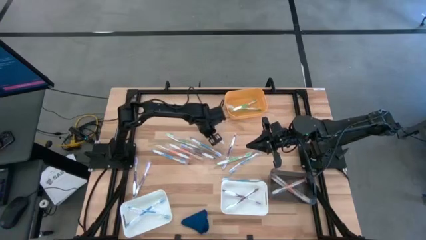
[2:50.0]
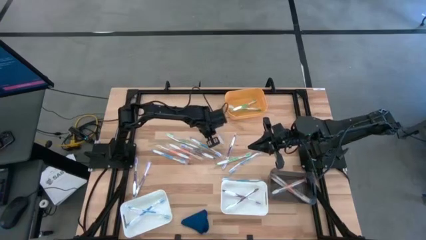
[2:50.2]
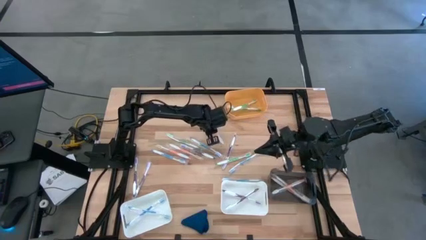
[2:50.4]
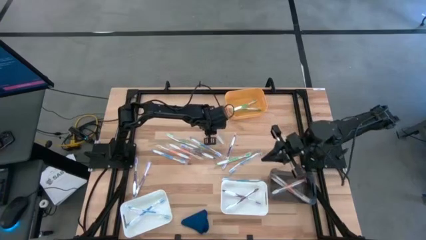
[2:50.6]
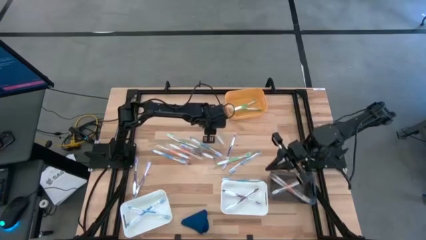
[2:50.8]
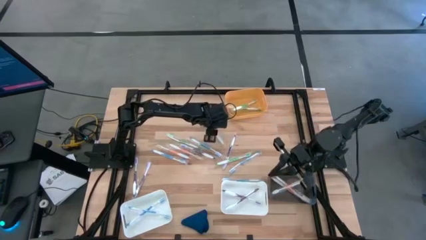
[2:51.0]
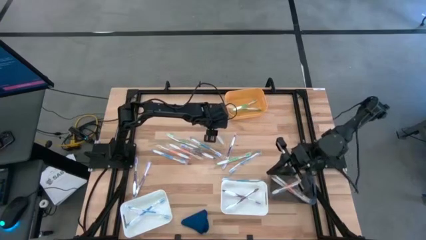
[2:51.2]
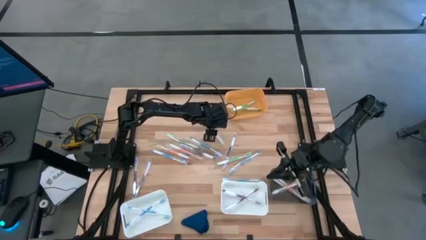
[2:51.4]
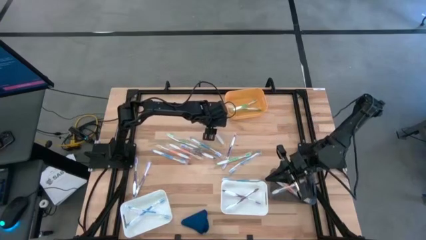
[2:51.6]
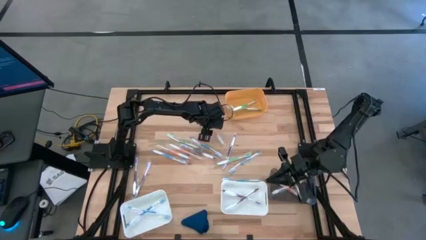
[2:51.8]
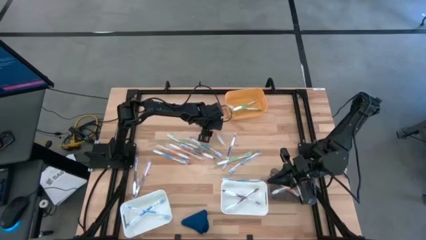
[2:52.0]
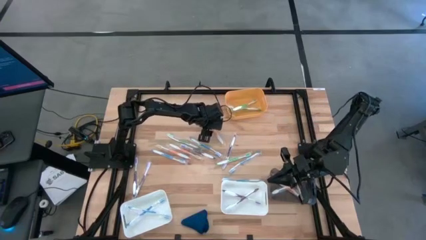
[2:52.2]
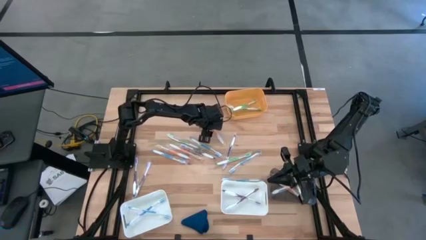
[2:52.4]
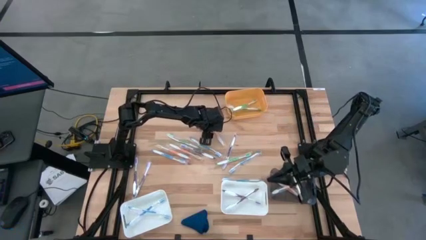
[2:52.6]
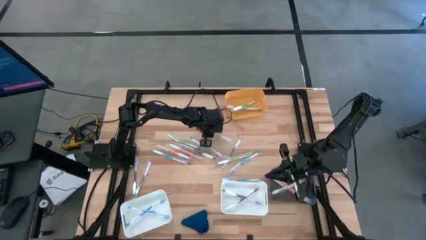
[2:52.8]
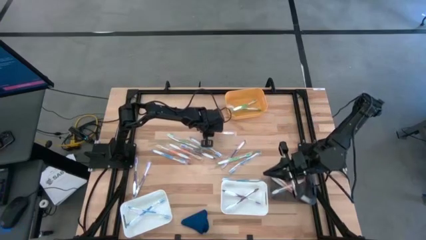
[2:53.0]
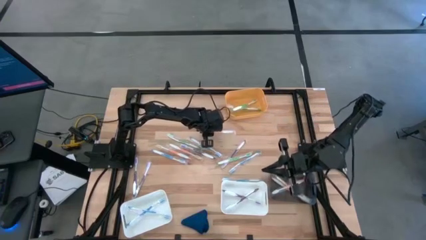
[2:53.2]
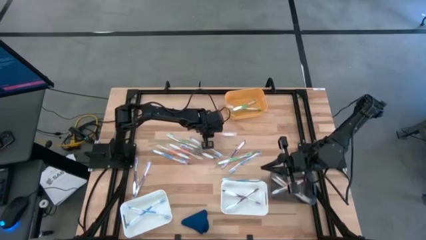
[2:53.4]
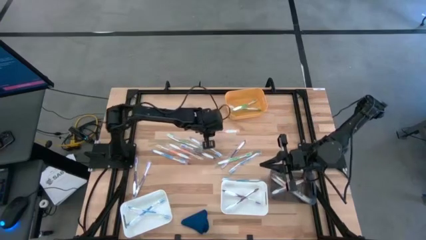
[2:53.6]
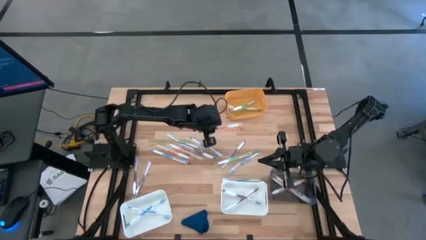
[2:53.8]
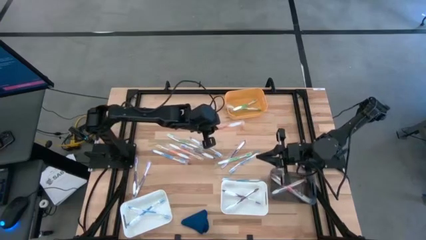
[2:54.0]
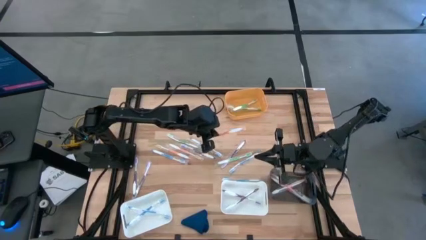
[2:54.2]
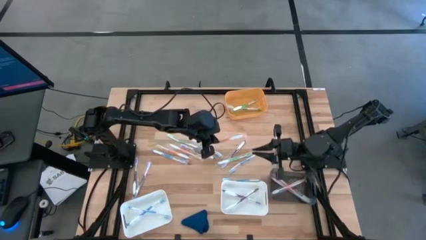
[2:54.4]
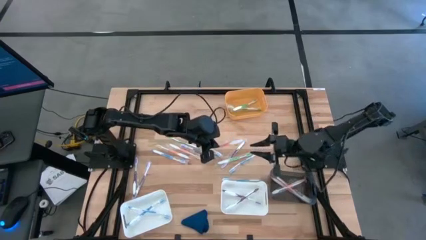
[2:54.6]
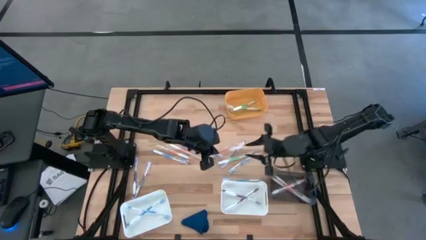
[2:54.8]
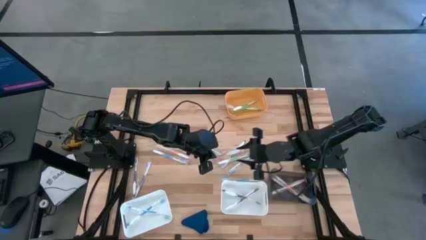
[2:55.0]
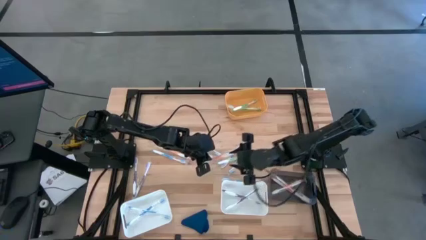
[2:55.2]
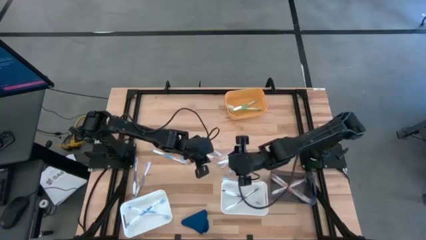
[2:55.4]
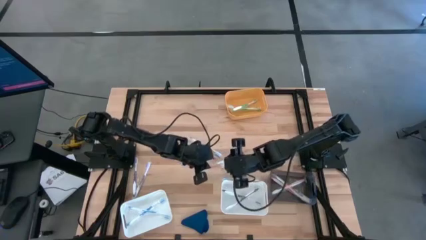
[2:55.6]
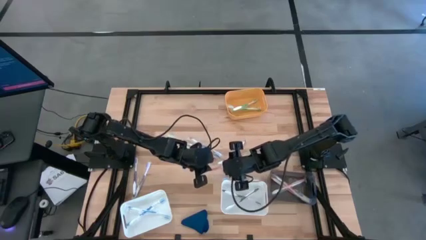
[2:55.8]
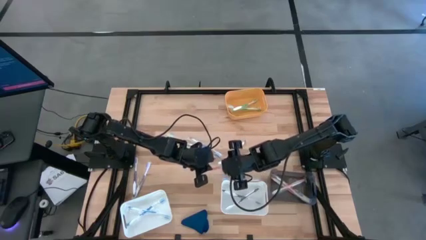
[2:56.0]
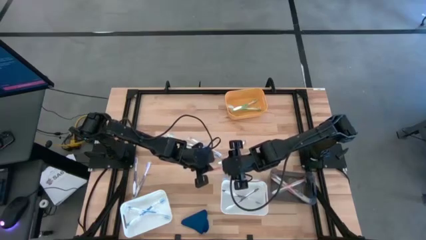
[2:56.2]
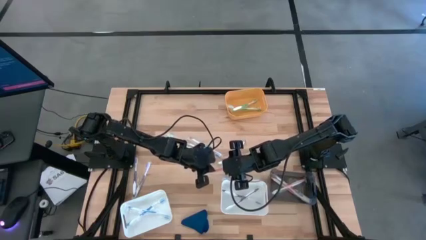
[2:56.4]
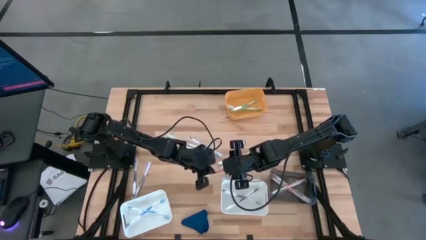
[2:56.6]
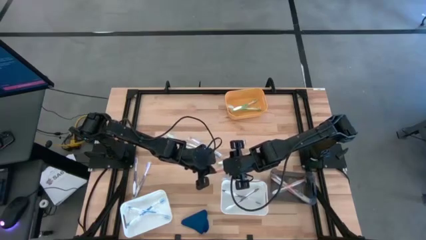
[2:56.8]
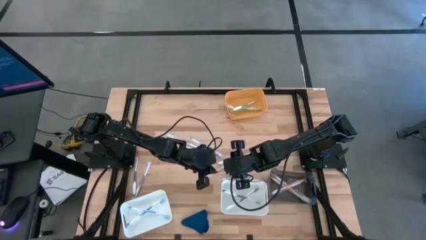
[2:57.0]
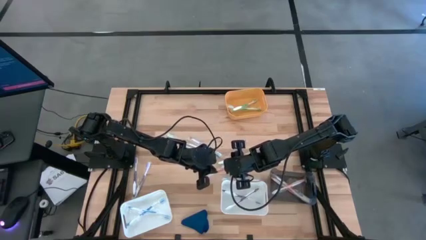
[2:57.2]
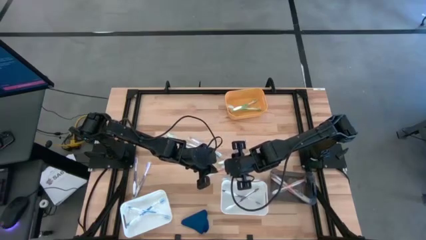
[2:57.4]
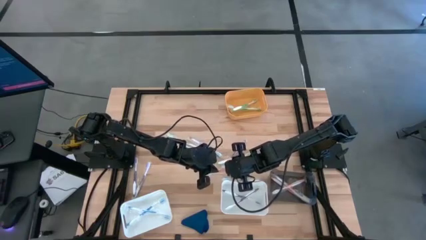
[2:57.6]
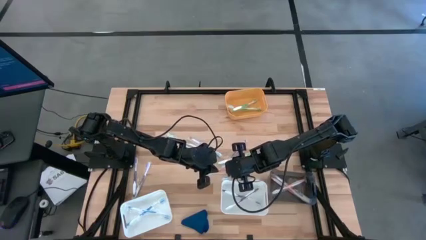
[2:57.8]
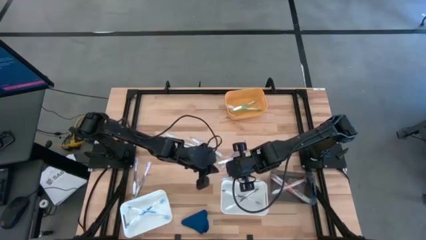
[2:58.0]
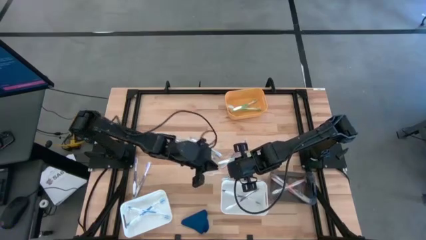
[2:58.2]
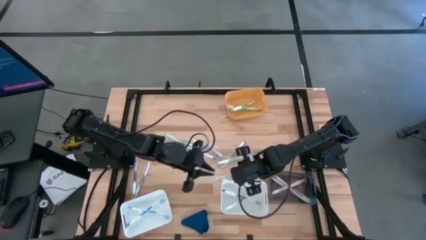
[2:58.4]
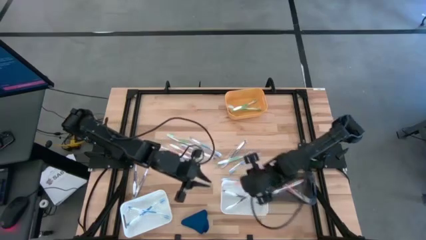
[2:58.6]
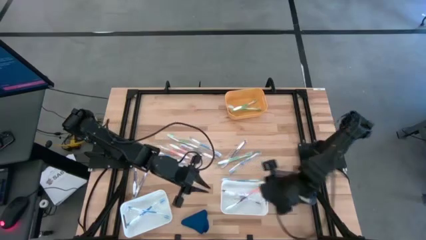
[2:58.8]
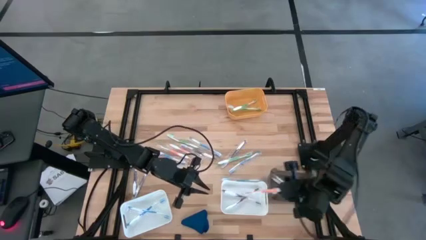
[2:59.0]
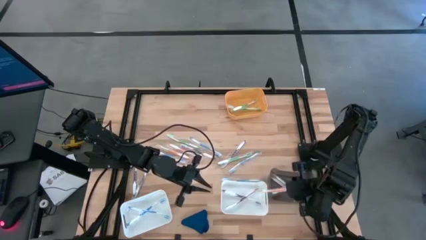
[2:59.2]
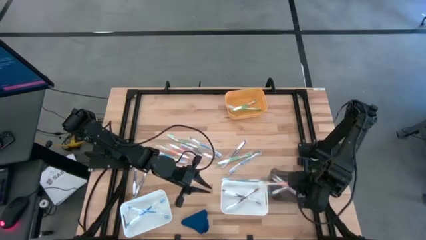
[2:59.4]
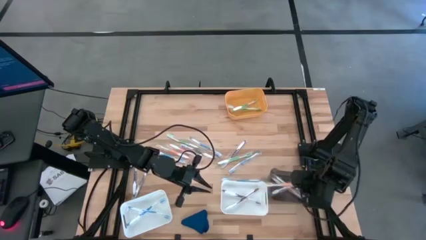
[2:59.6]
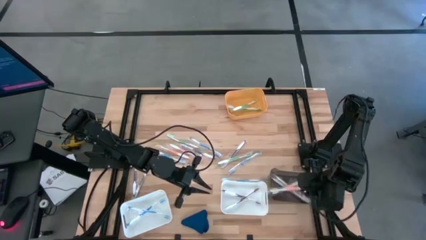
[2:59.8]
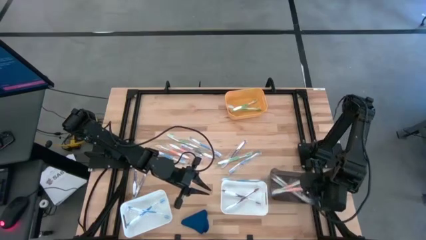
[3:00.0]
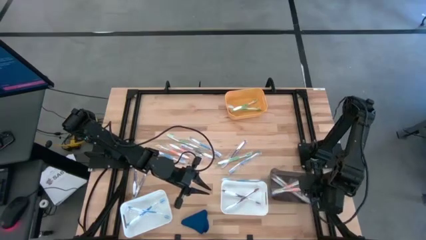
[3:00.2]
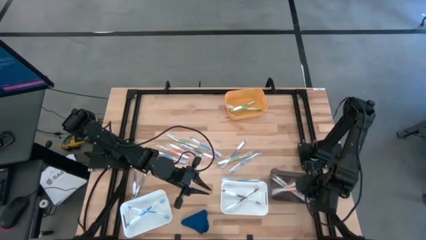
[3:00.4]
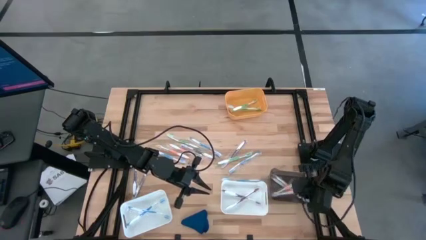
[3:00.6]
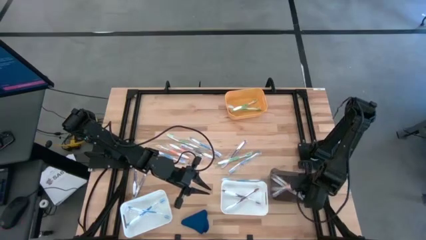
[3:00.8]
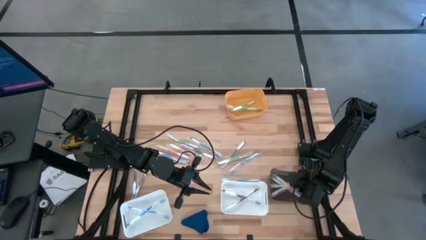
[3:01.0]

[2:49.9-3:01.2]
Task: Pick & Place Toothbrushes
Put the orange toothbrush into the black bin

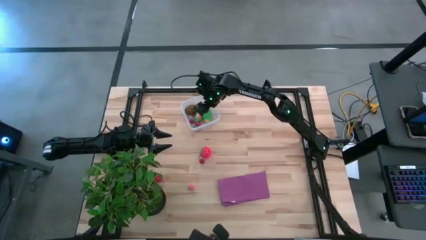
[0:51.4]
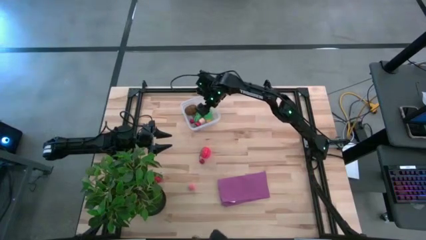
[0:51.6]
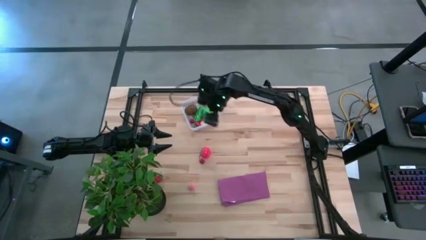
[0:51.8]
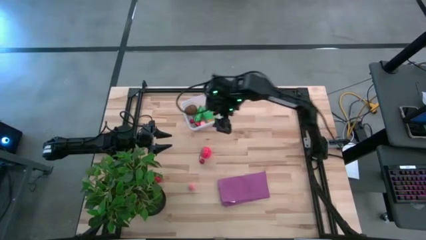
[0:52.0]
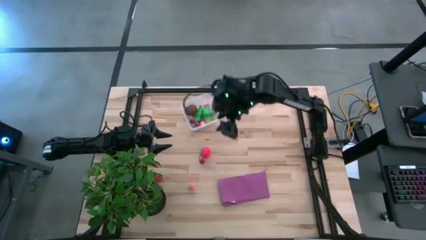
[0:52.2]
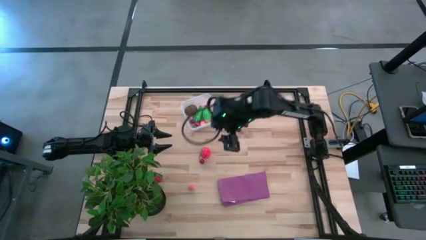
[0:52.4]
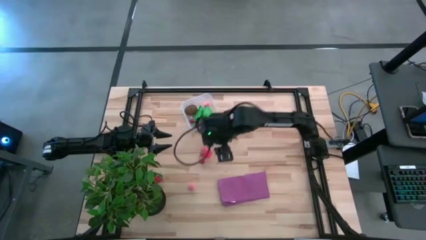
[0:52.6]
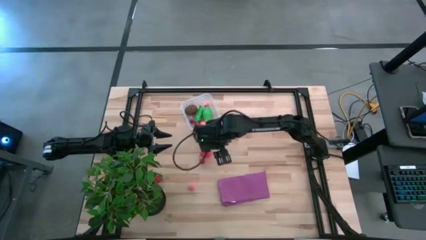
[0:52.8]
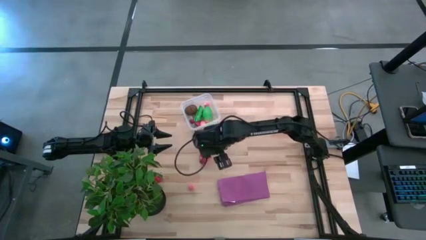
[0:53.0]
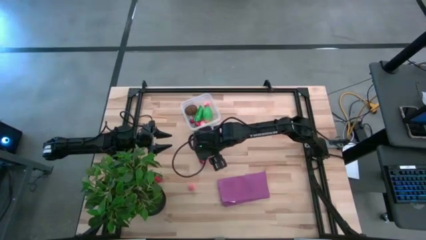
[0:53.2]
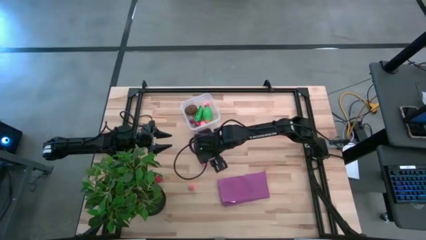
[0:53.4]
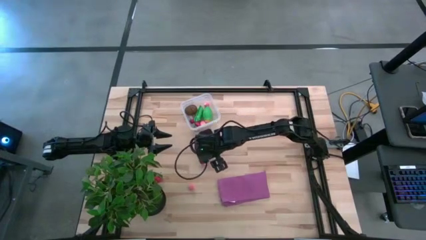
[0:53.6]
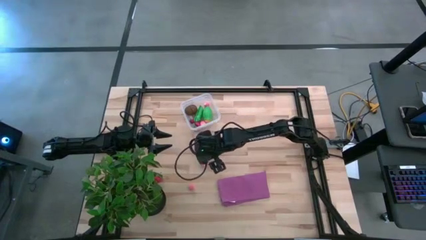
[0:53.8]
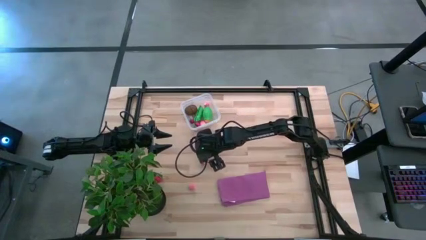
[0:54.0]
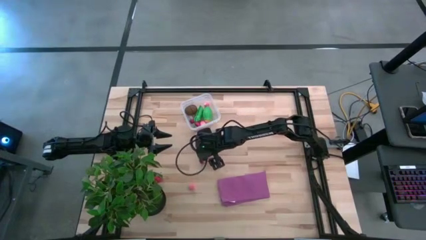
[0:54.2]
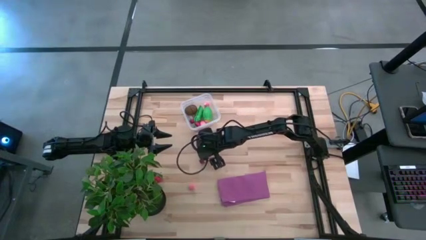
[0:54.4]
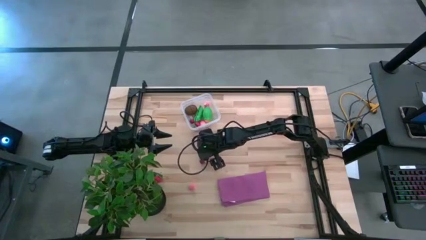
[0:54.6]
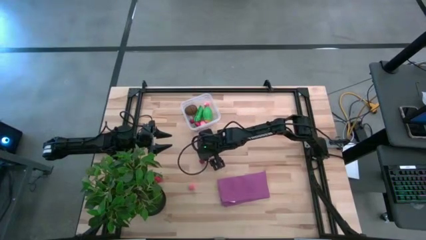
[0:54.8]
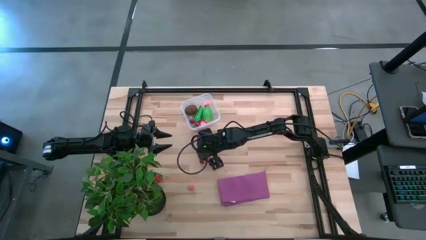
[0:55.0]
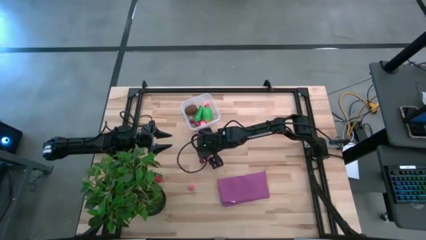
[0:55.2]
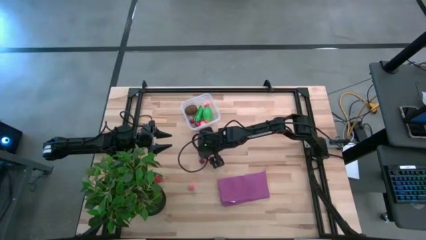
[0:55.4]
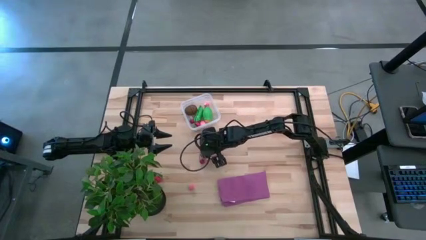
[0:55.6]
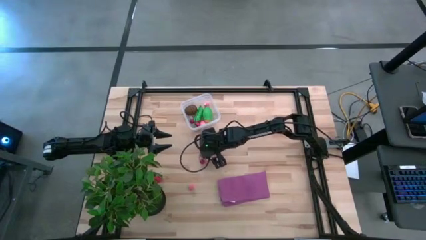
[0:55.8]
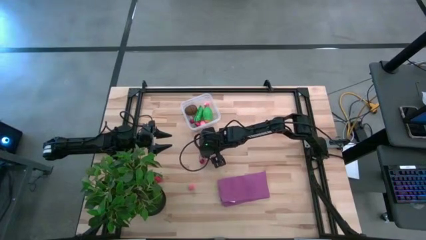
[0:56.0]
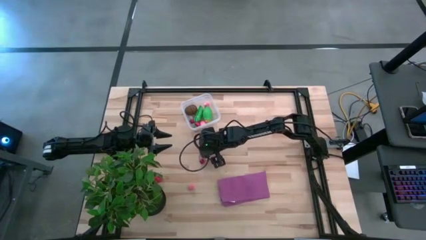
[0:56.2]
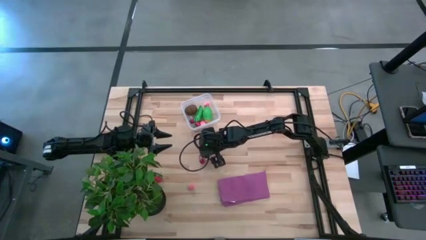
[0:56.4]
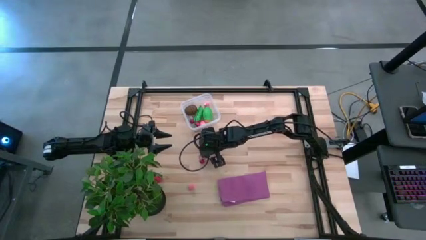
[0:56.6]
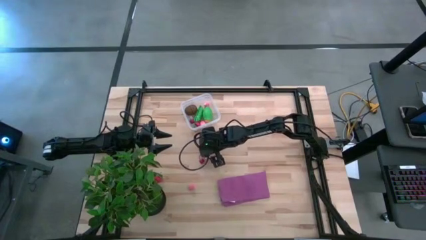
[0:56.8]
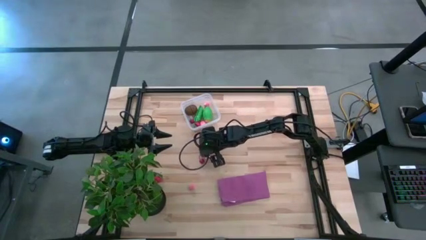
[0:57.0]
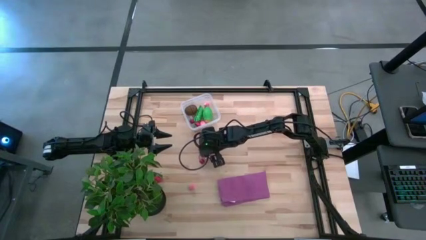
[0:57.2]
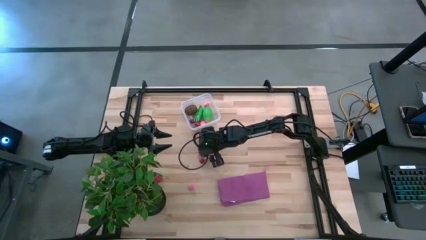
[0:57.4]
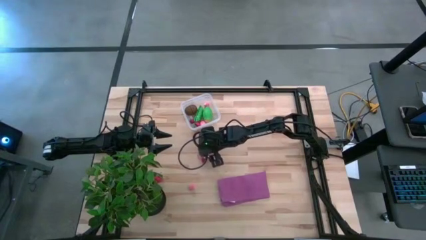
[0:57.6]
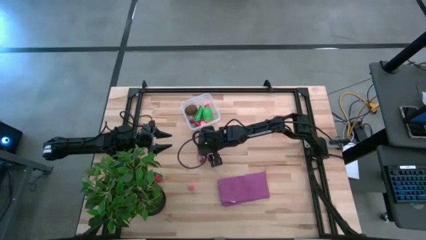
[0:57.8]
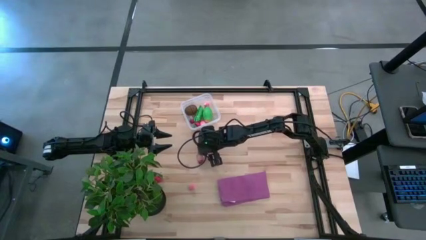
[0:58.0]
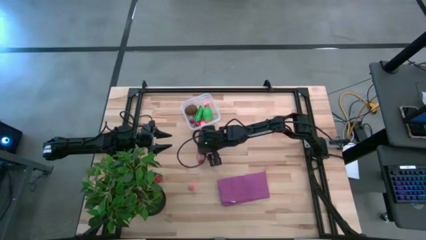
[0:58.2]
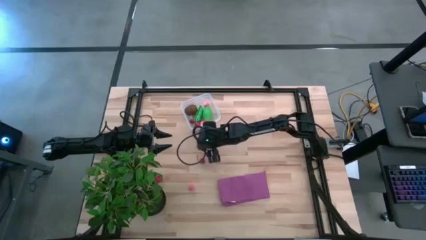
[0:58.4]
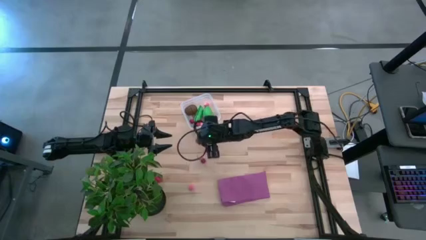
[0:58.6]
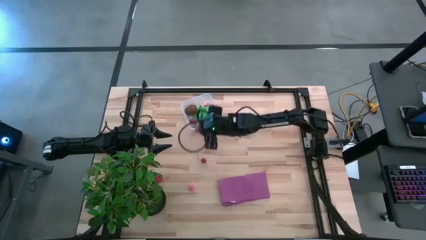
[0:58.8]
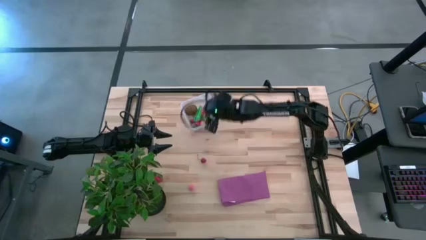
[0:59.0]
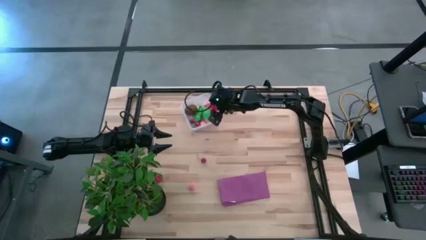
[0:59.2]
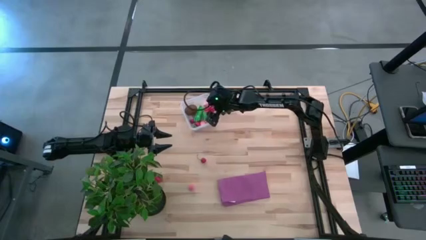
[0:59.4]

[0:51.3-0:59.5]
Task: Pick and placing Produce into tupperware
Put the red tomato into the transparent bin
